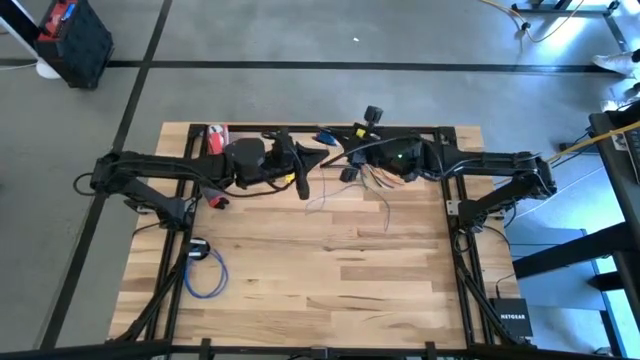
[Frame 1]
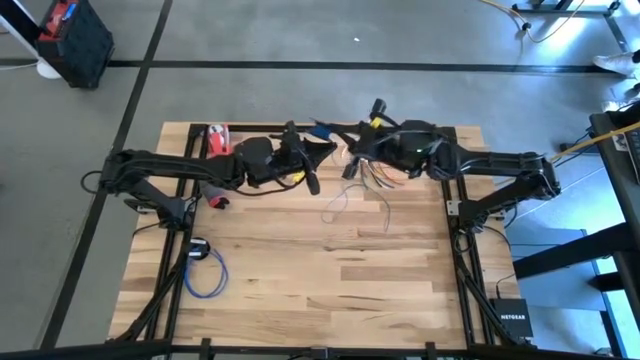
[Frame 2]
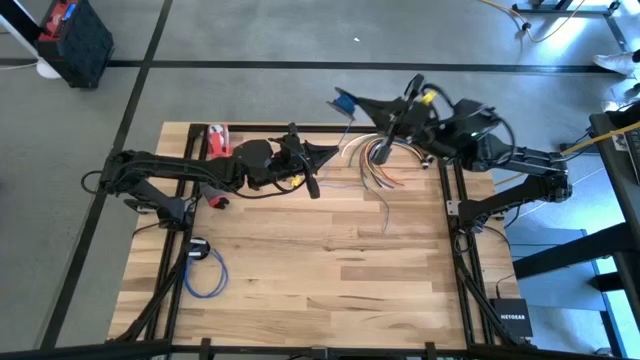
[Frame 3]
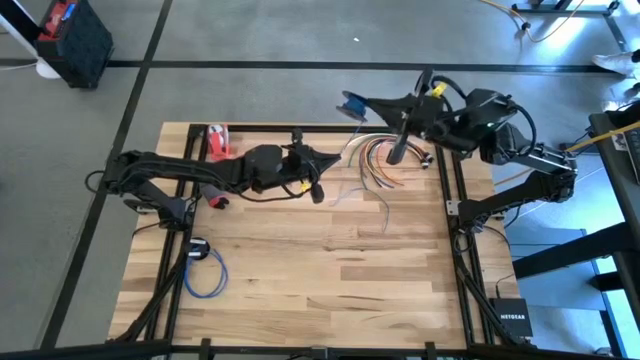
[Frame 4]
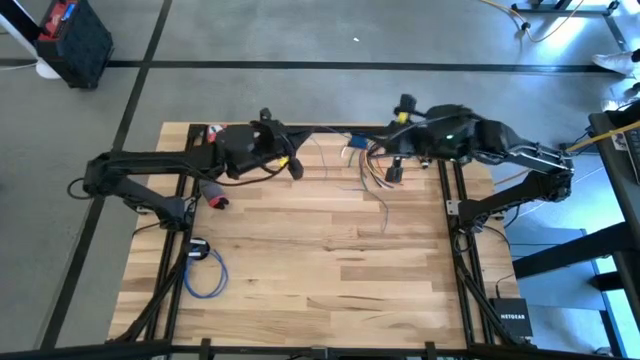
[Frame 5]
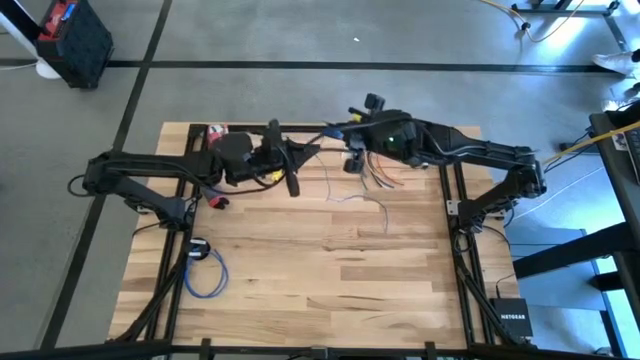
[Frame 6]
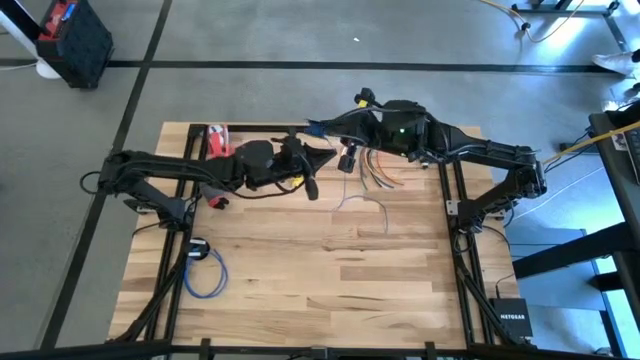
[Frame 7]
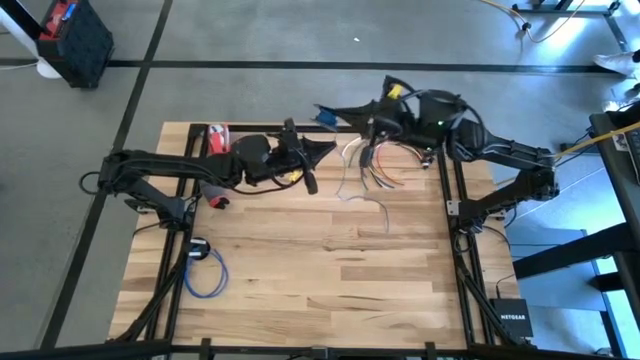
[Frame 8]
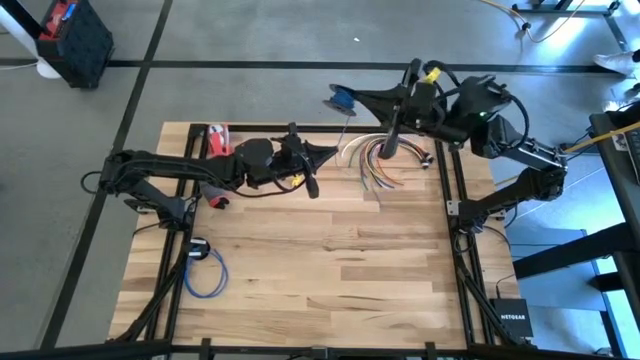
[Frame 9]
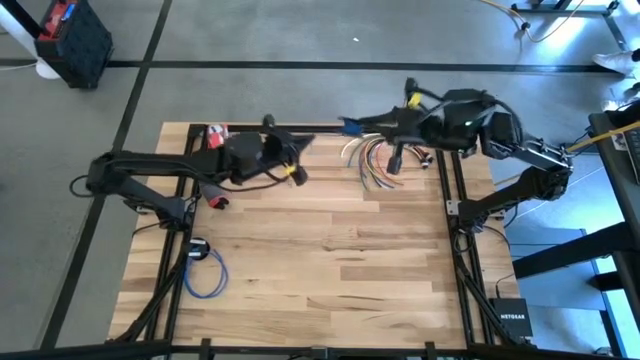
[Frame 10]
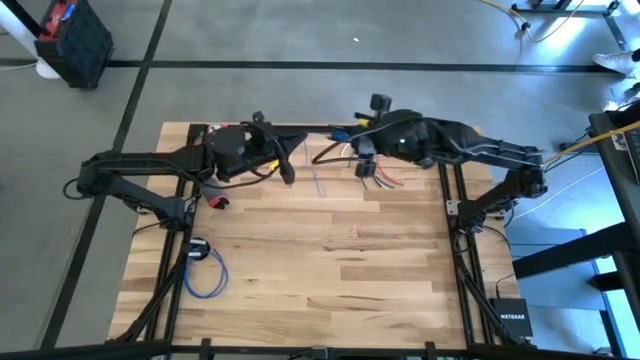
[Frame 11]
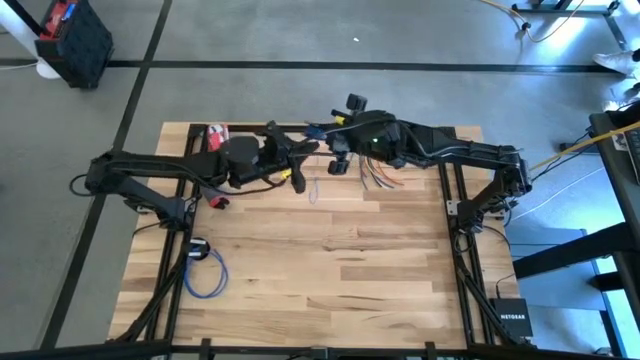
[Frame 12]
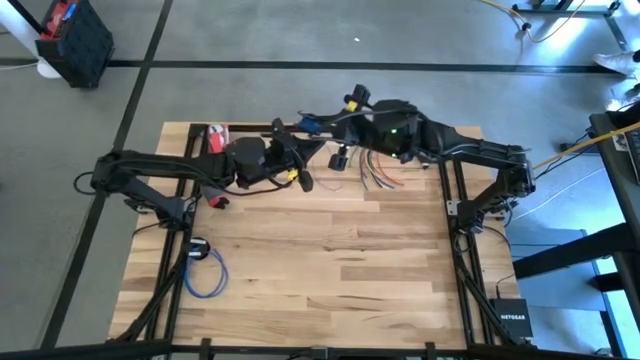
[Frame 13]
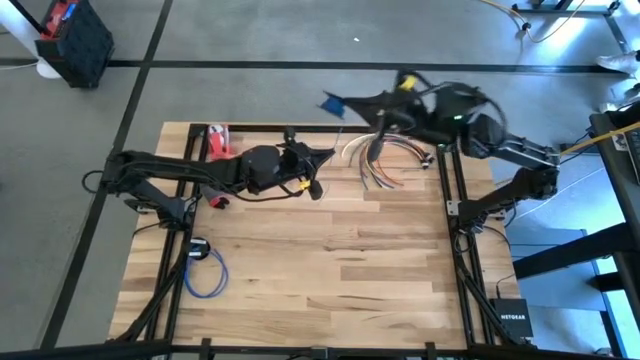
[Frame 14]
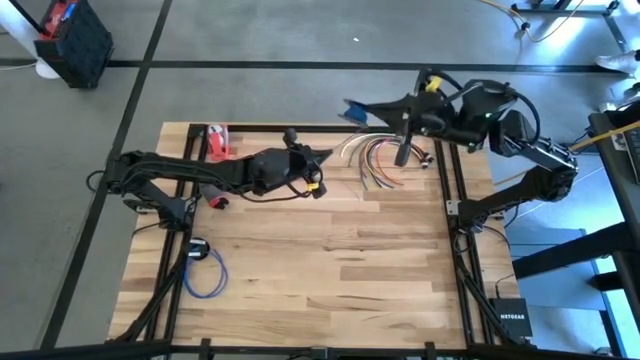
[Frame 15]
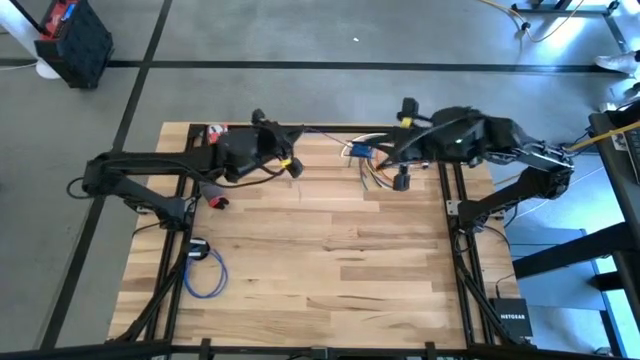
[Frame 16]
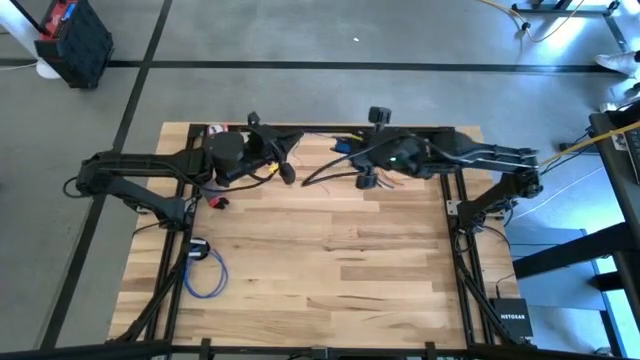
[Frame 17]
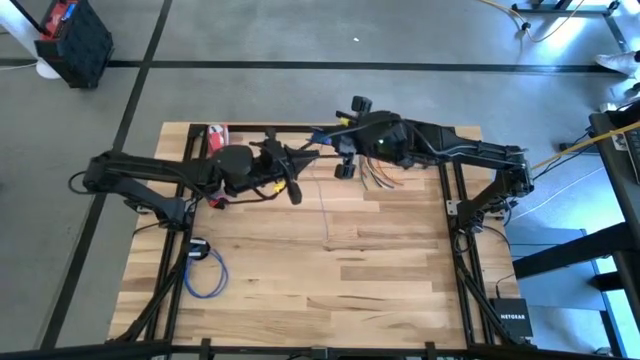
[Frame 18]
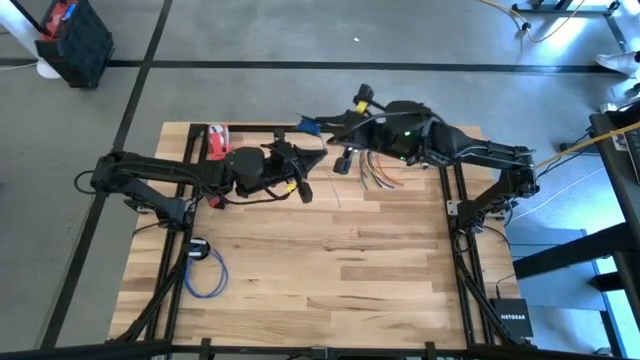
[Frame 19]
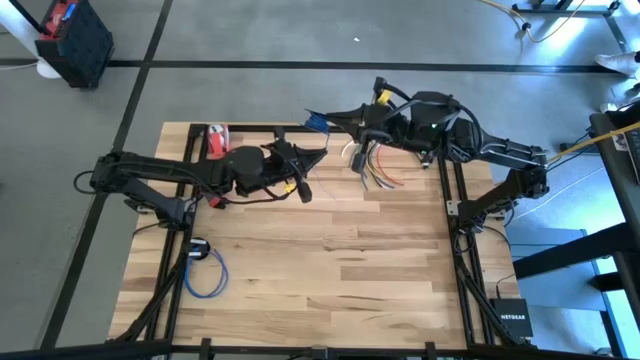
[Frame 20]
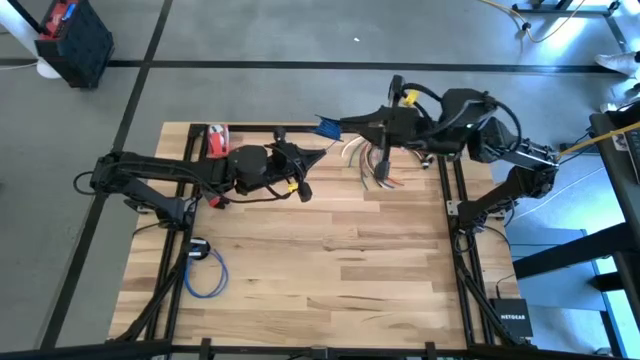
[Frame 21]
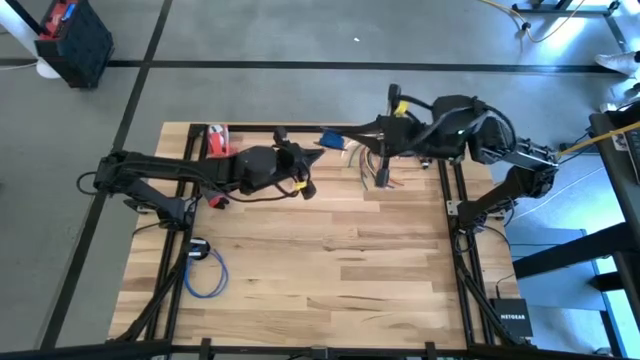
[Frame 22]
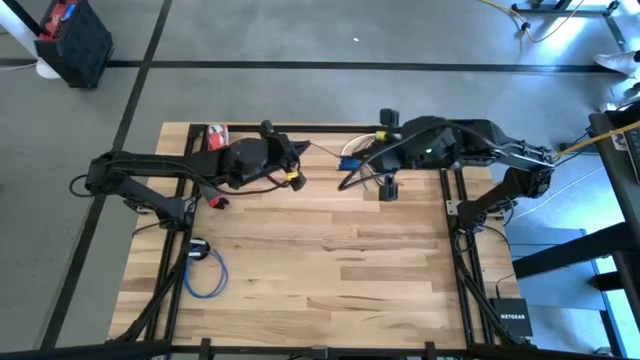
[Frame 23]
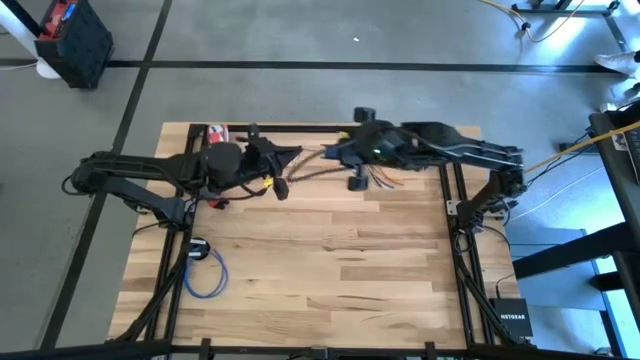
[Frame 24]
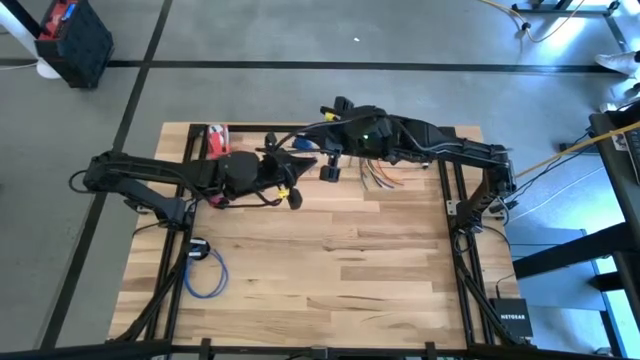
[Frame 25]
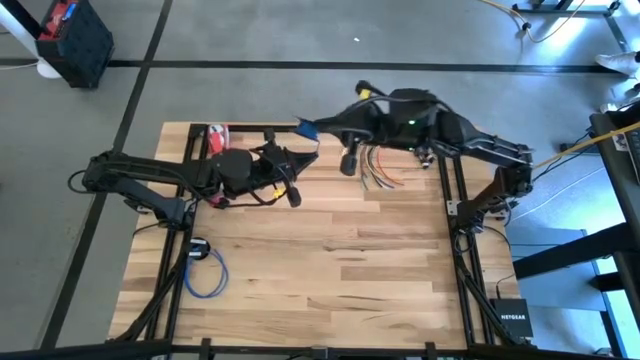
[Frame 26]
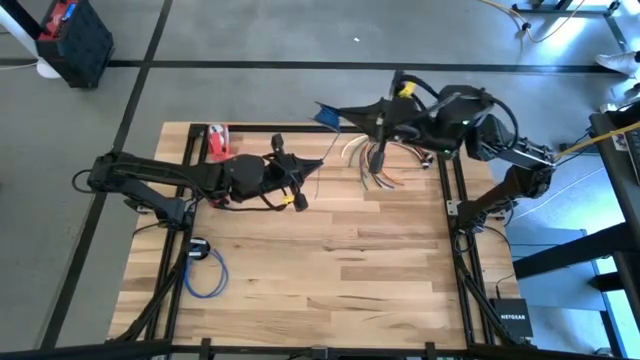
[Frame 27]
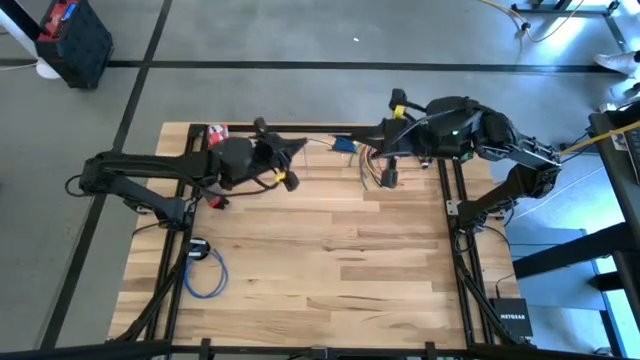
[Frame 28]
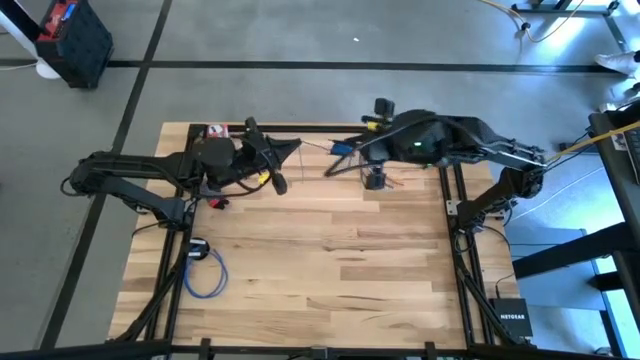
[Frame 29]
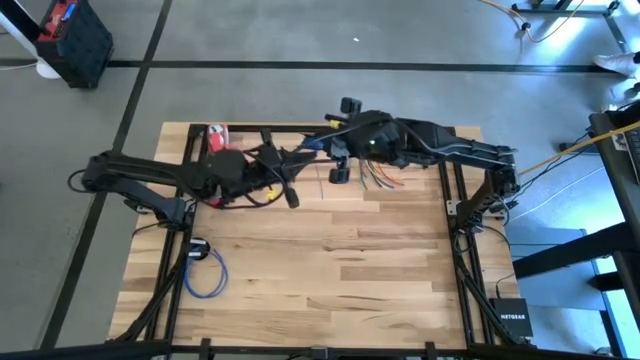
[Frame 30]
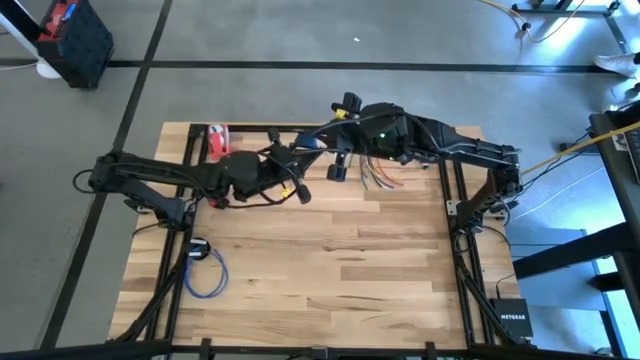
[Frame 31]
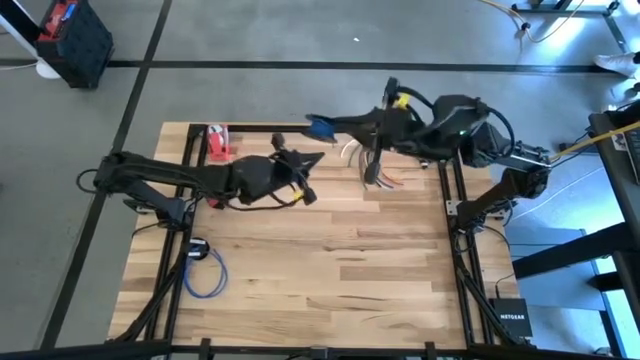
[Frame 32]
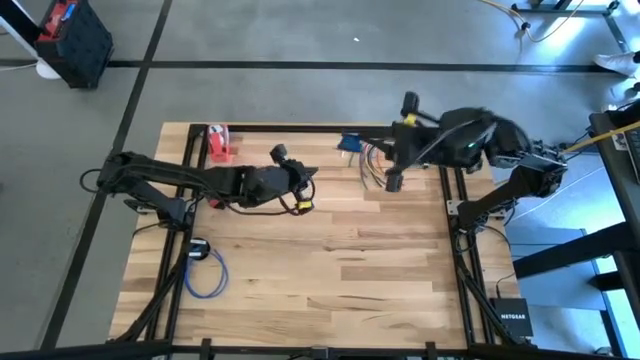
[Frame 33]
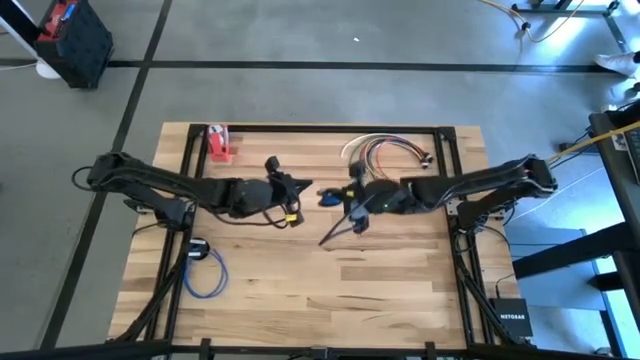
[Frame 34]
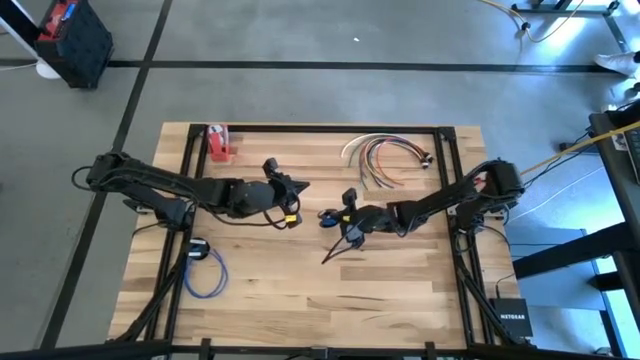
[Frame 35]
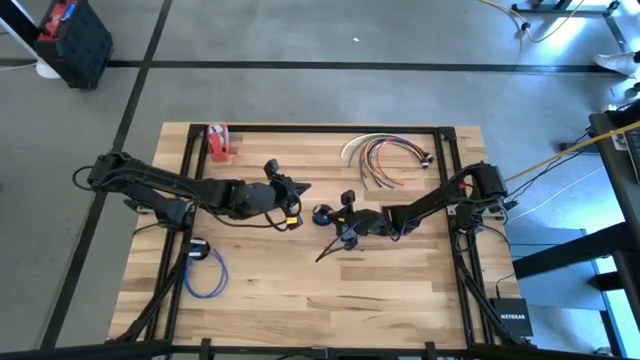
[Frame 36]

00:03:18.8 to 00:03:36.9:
Task: Coil cords
Coil the blue cable wire on the black spool

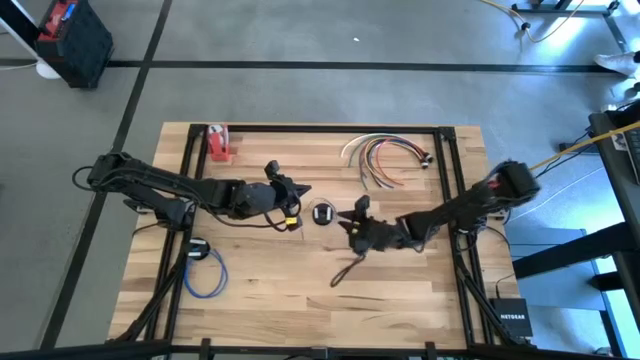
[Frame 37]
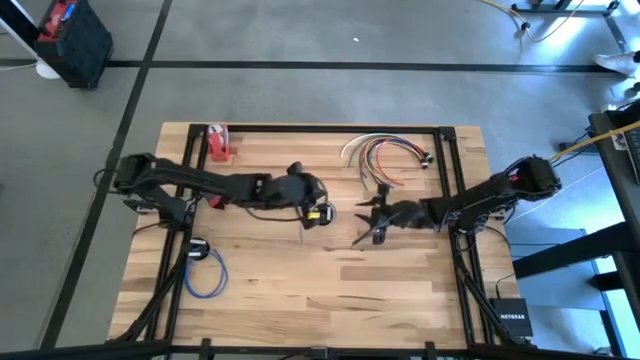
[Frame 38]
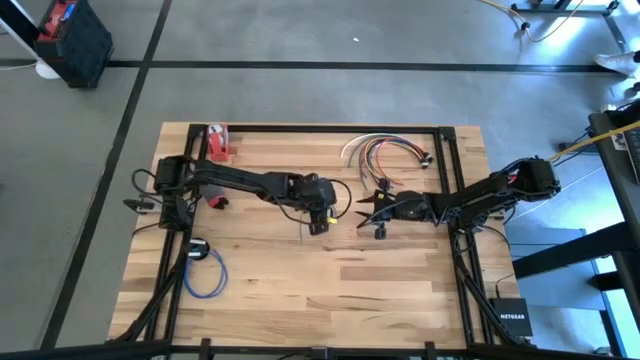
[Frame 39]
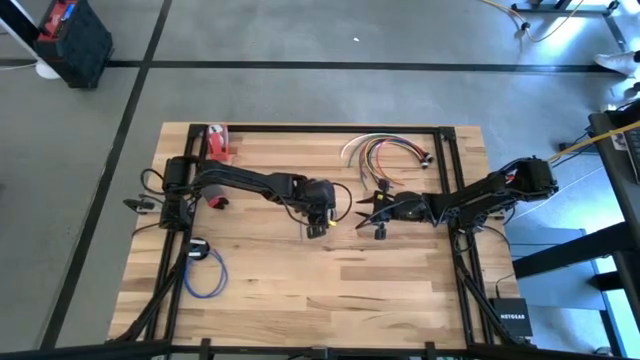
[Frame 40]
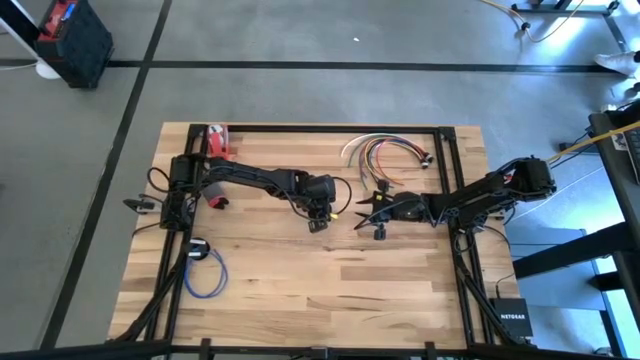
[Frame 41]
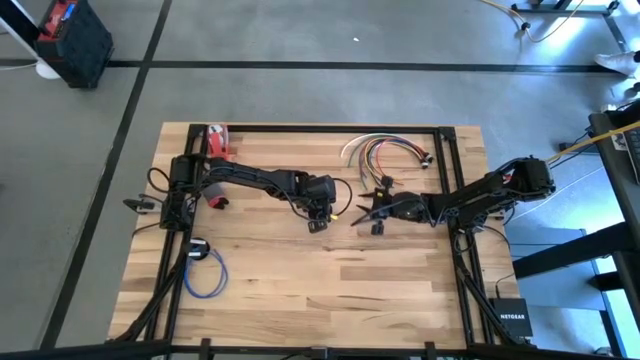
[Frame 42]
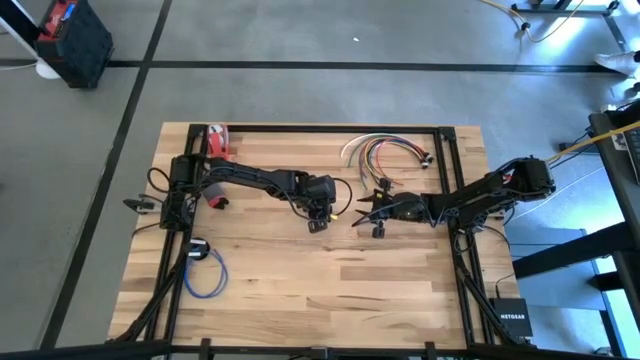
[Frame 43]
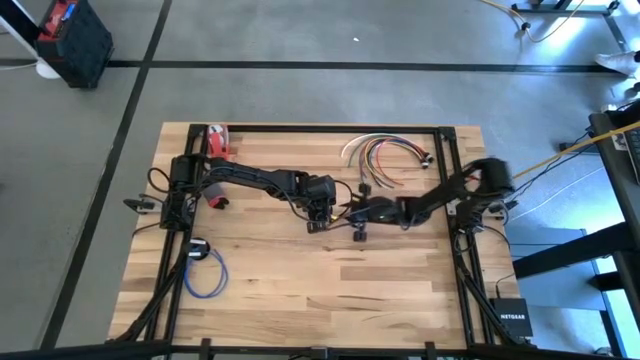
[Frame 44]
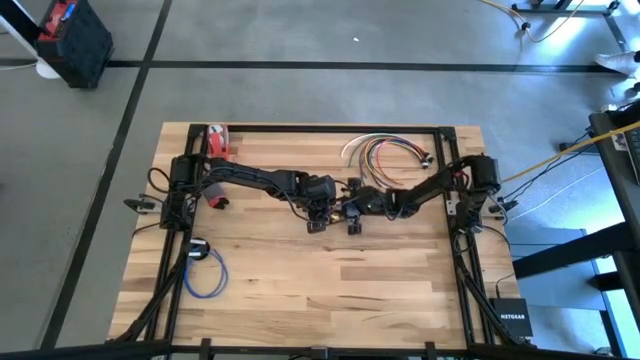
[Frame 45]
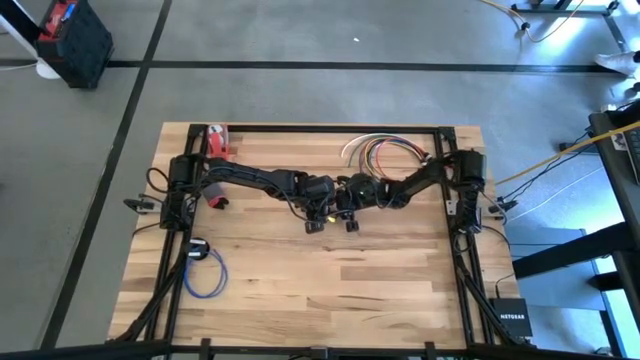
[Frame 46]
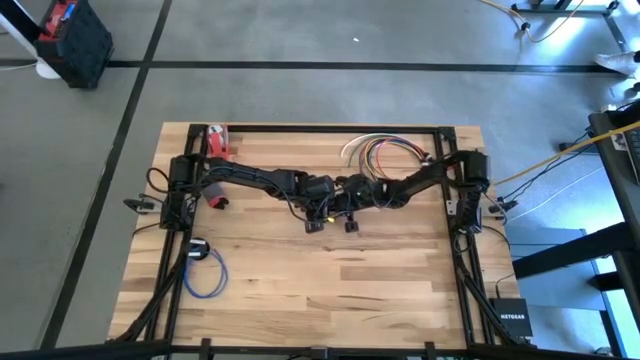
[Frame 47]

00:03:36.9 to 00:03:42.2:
Uncoil the blue cable wire from the spool
